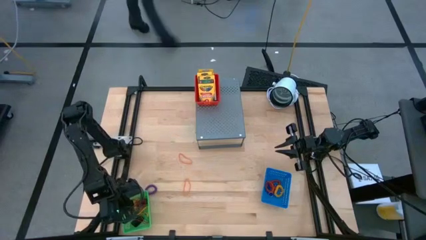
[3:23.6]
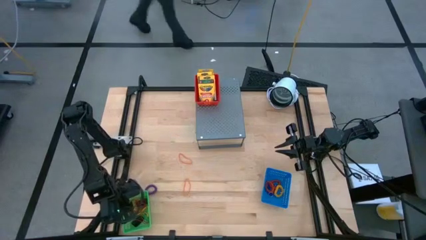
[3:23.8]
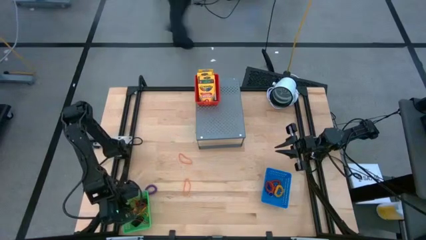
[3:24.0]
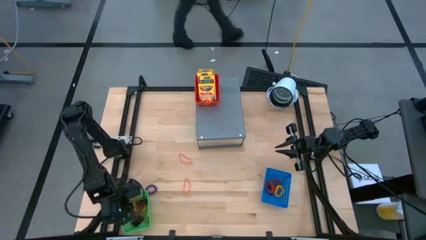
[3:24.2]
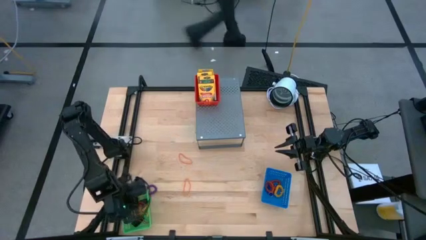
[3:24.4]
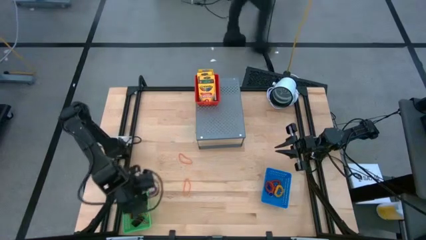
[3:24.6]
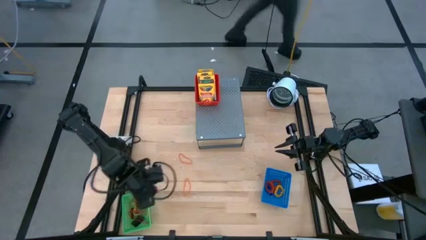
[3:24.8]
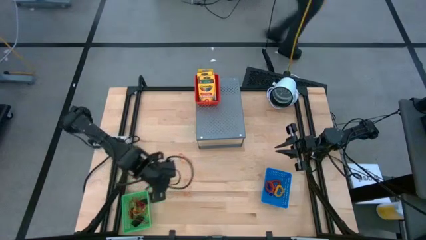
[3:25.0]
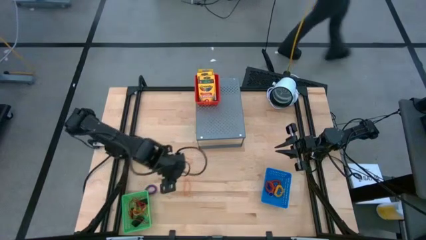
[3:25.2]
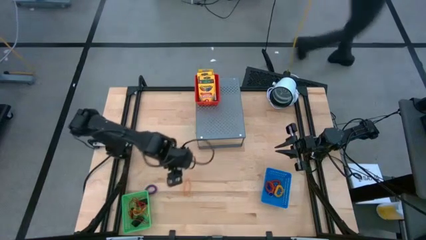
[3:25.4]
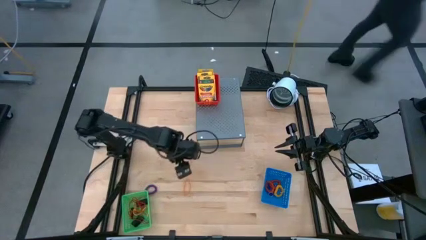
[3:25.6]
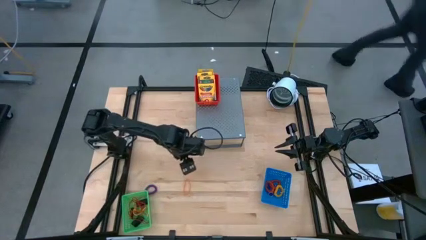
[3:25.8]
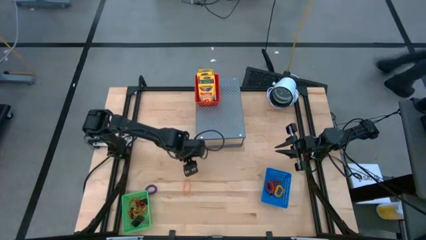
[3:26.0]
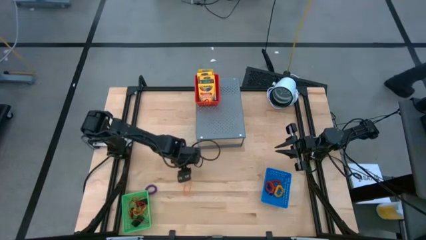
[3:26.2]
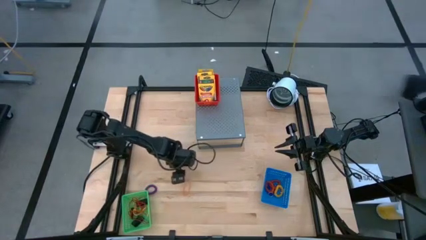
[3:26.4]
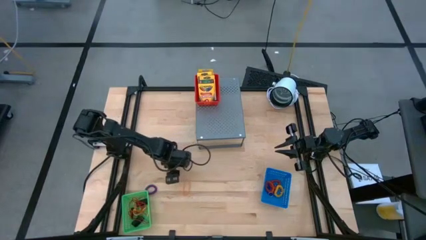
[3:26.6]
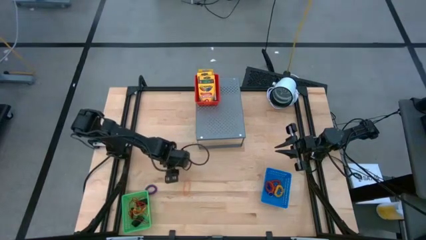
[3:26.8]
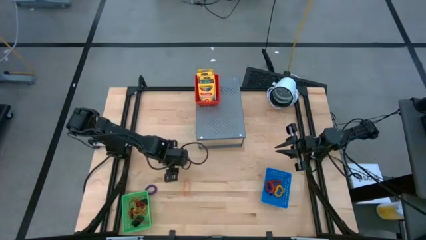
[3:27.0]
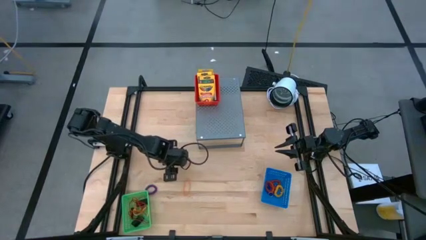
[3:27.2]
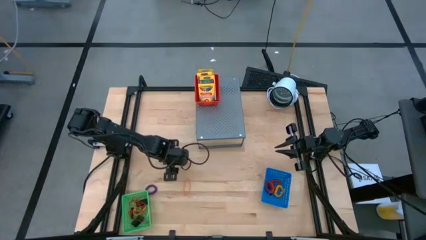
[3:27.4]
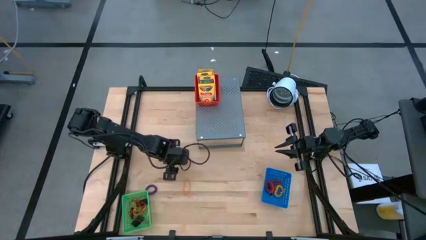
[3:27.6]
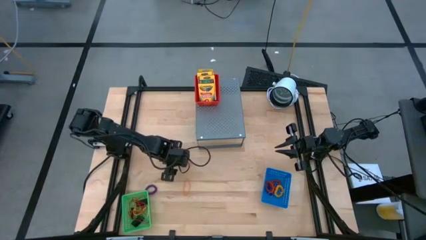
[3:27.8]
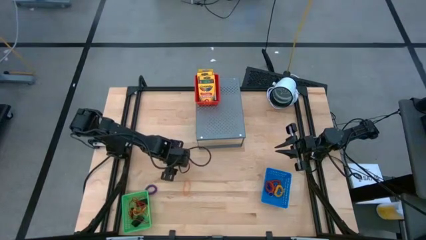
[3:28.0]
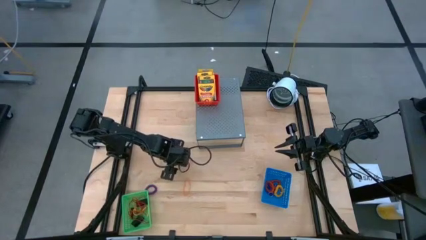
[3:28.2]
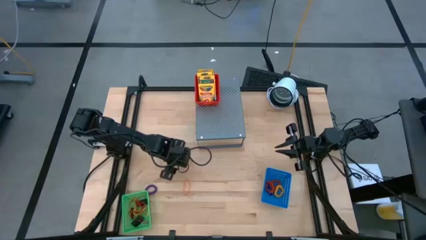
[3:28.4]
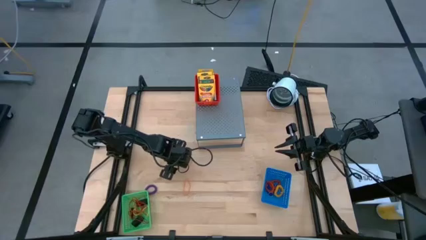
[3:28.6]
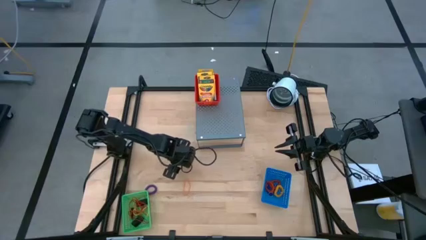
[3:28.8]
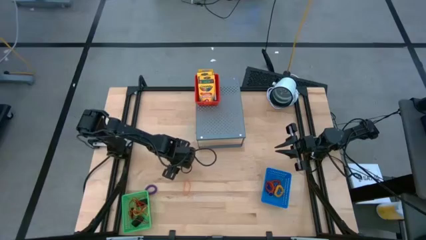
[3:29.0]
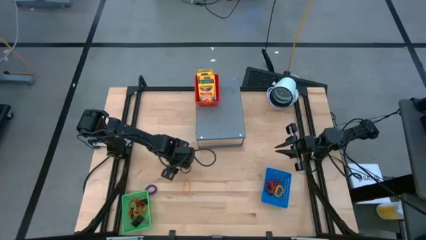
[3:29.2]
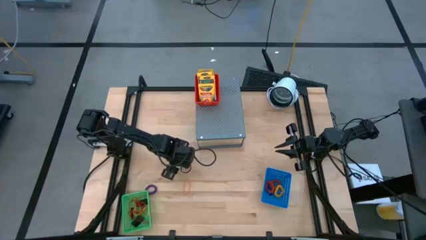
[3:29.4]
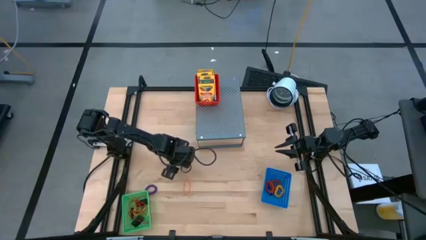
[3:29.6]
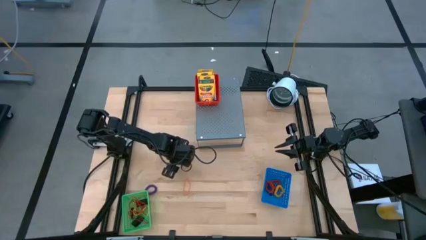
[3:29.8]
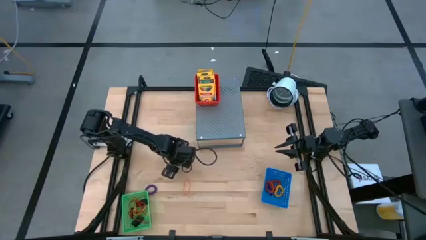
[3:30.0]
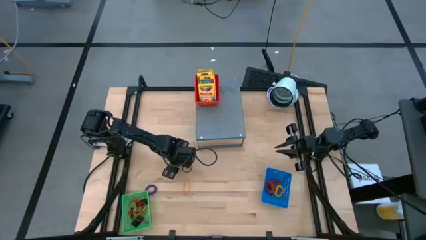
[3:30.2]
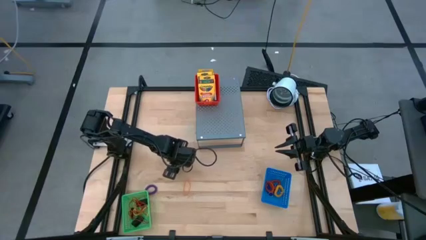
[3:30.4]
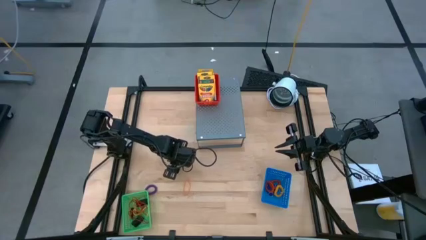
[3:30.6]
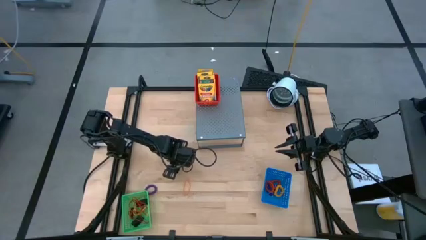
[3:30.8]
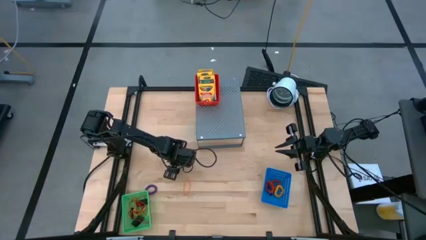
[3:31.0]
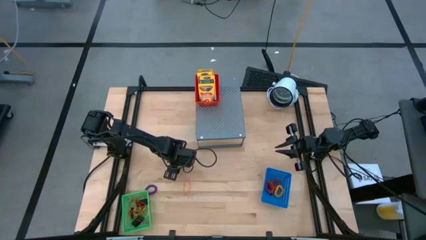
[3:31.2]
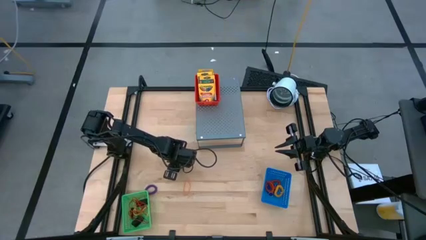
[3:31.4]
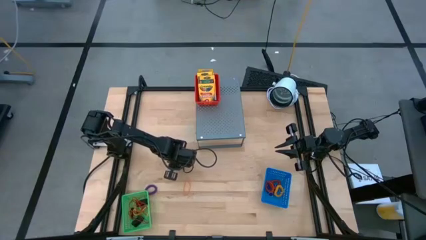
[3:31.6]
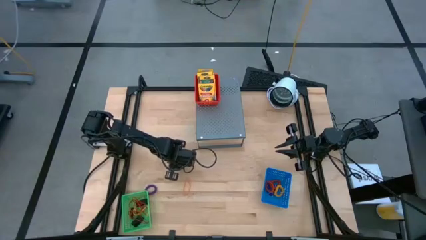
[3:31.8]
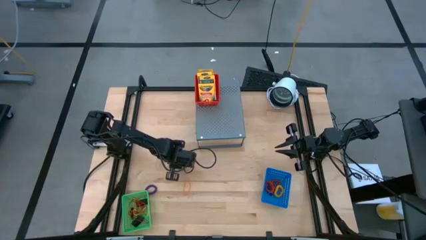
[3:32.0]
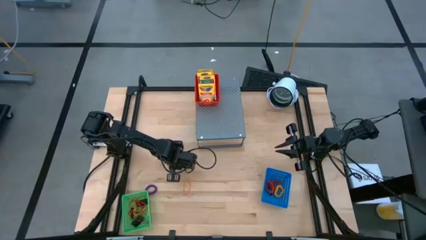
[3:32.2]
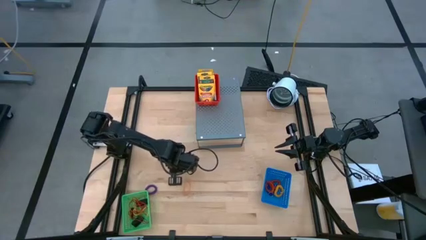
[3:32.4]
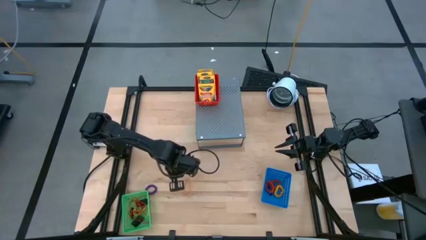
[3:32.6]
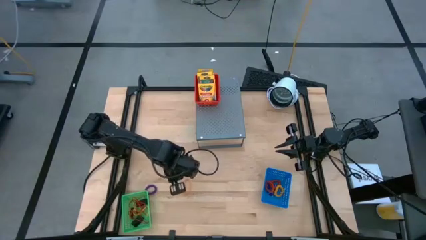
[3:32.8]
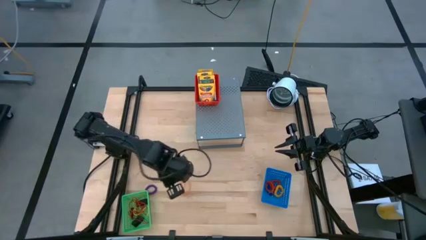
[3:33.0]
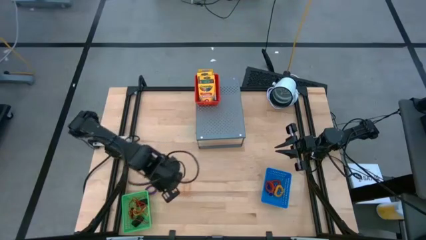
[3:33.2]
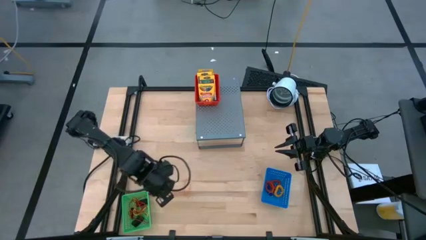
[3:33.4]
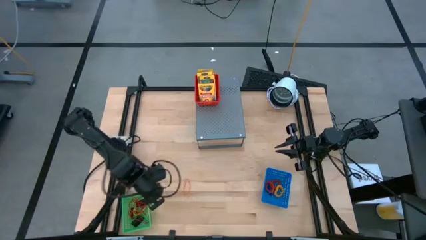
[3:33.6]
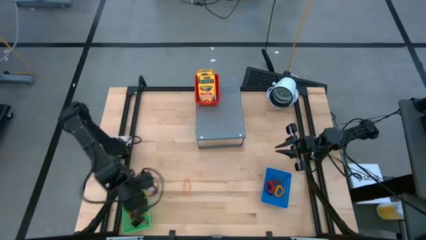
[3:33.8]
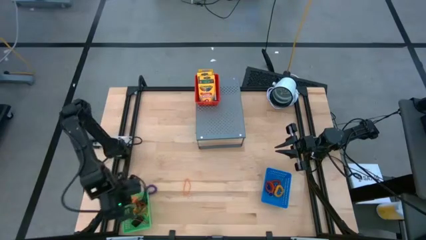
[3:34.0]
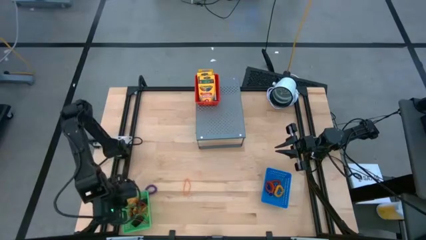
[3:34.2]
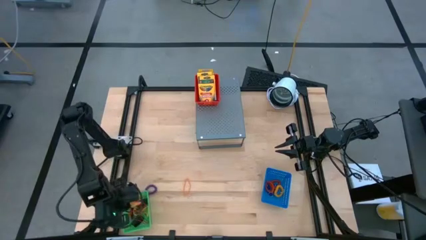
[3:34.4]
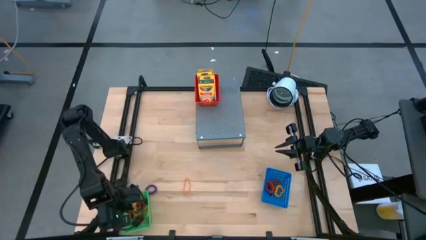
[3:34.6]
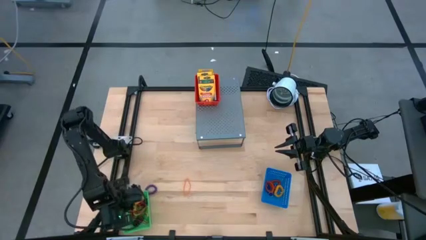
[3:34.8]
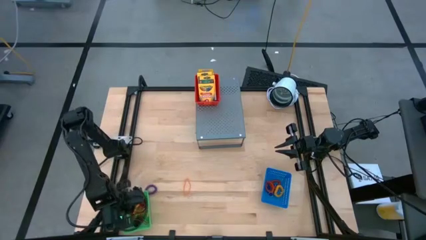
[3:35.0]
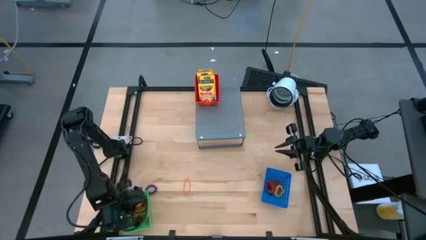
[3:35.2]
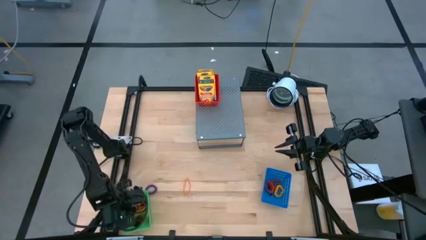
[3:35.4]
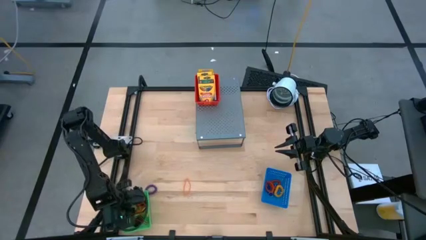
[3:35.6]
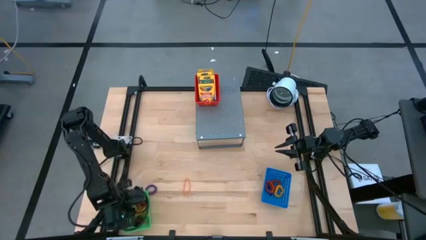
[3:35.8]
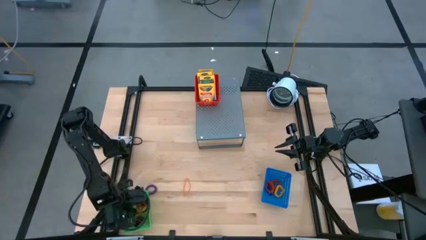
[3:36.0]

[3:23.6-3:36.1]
Task: Pick & Place Office Desk Supplies
Put the orange rubber band into the green bin

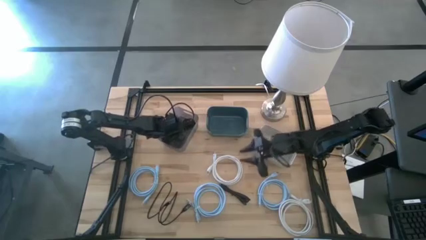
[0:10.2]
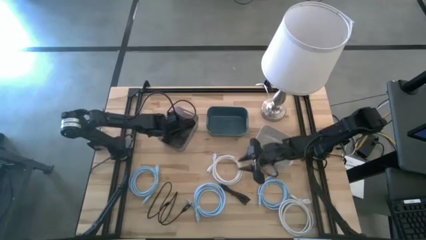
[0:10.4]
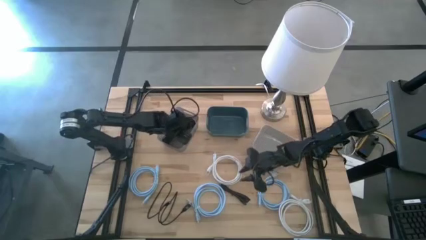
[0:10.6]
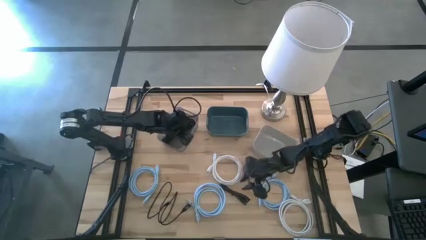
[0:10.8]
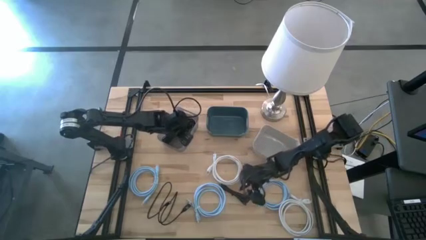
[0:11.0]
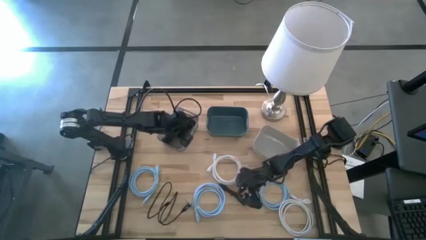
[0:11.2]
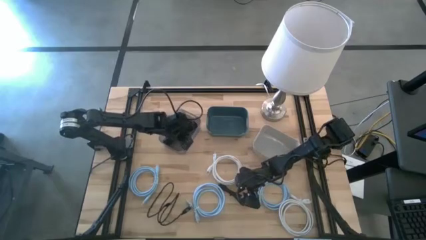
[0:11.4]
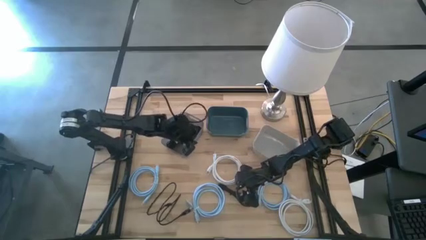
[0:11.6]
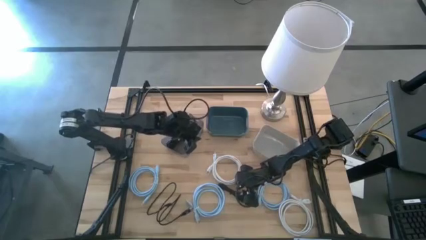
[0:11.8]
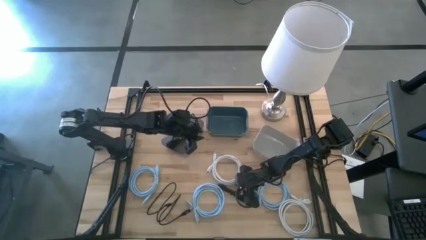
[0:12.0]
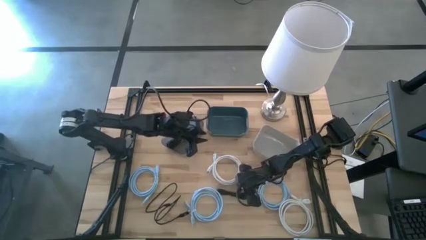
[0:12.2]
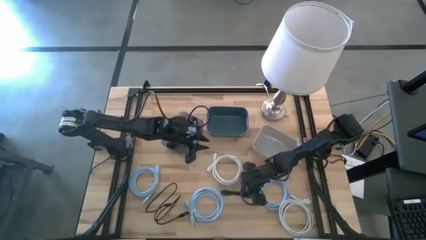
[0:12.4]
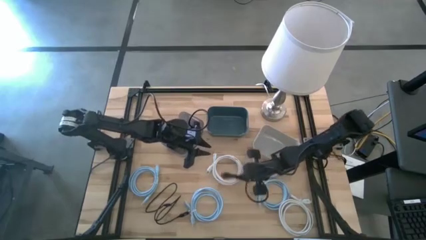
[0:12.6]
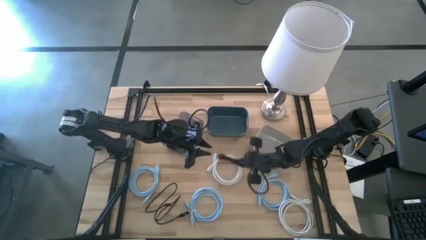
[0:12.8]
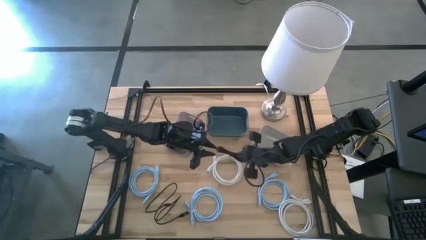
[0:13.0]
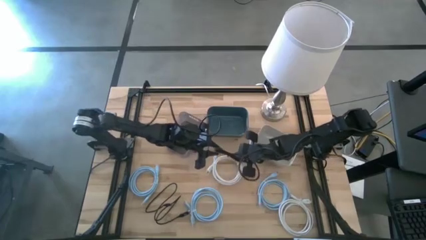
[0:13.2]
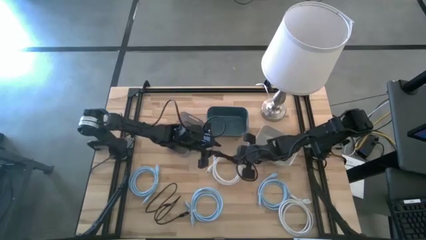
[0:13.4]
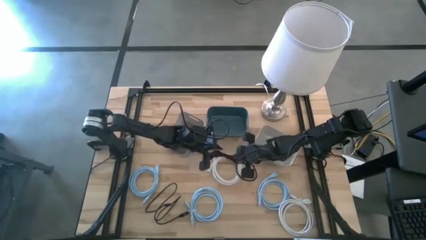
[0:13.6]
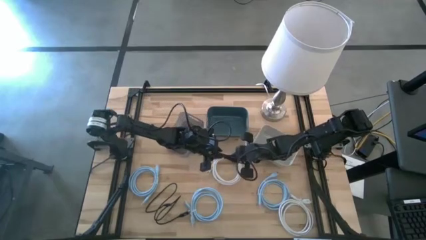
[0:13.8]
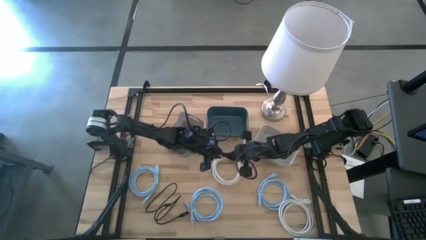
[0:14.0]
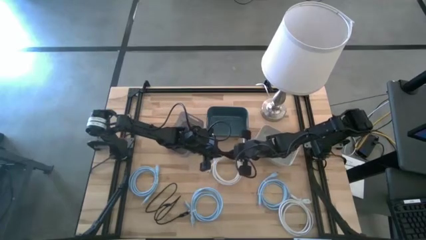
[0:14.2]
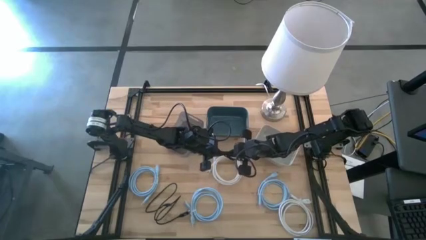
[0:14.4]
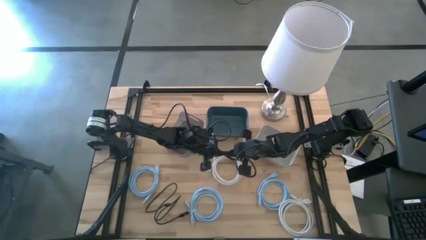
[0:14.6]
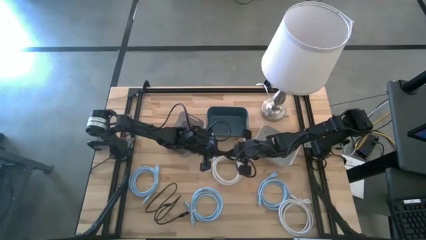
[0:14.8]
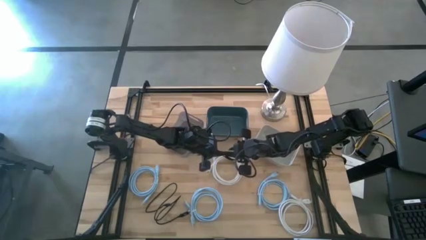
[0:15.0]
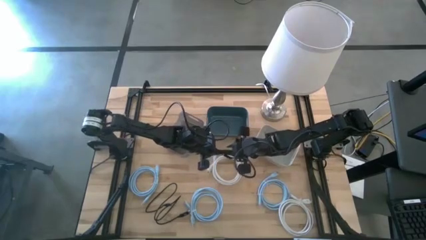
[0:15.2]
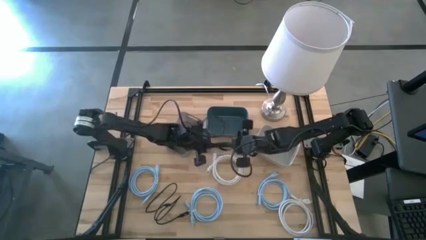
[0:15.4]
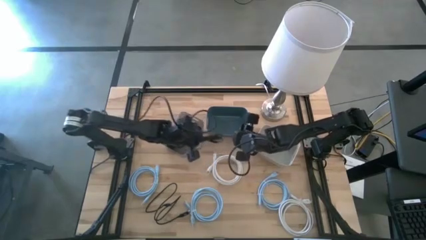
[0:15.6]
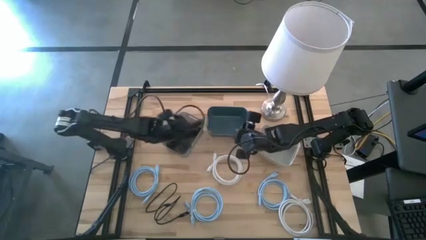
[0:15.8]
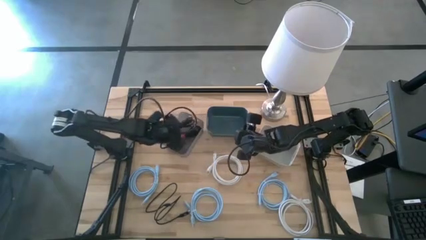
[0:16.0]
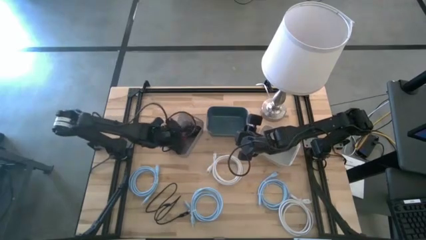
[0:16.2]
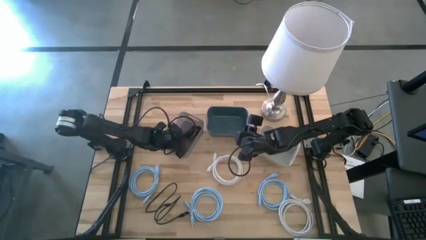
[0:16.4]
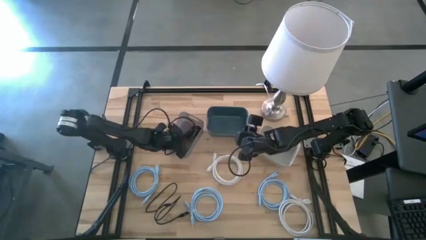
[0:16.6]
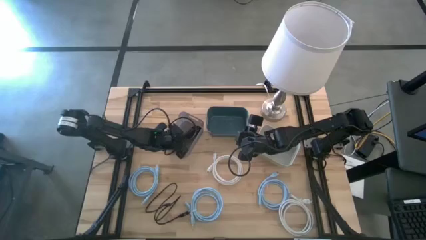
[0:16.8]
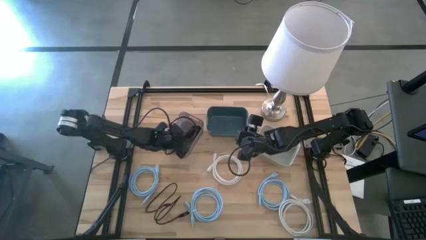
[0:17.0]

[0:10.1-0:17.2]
Task: Sort HDMI cables
Put the right black HDMI cable into the black bin
